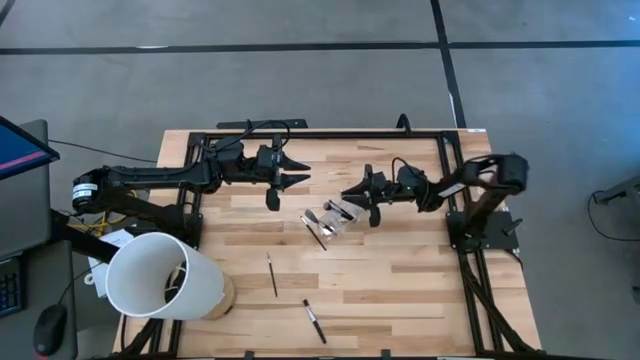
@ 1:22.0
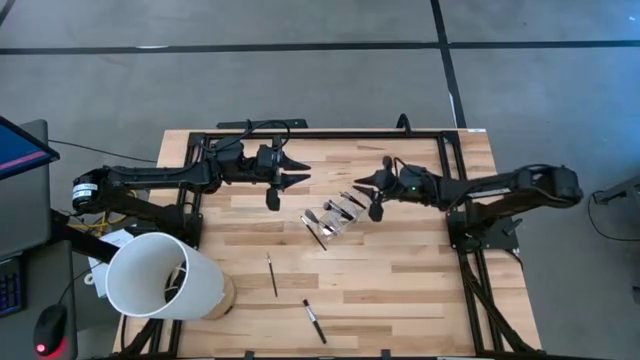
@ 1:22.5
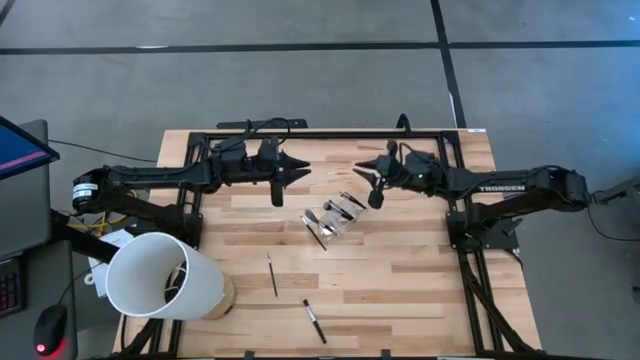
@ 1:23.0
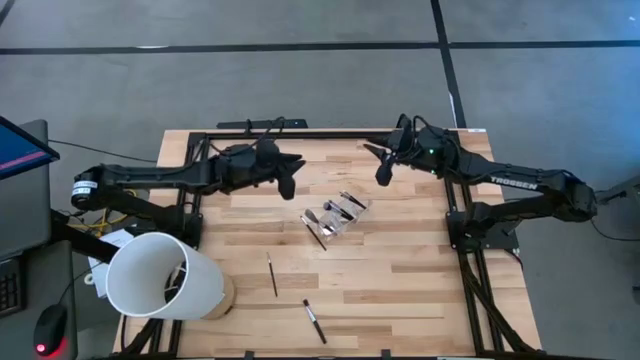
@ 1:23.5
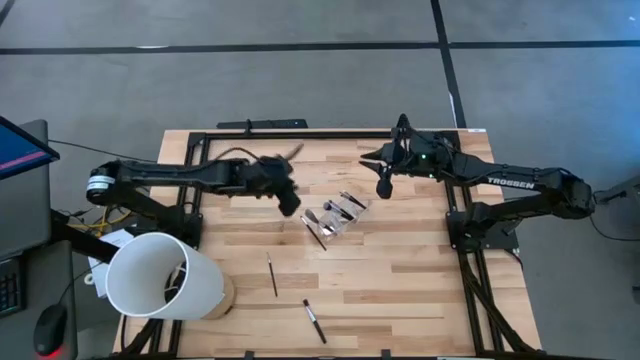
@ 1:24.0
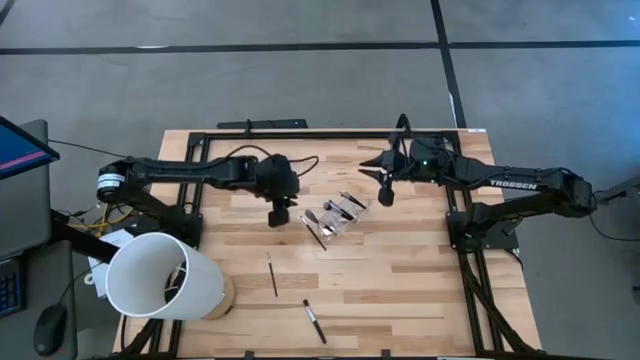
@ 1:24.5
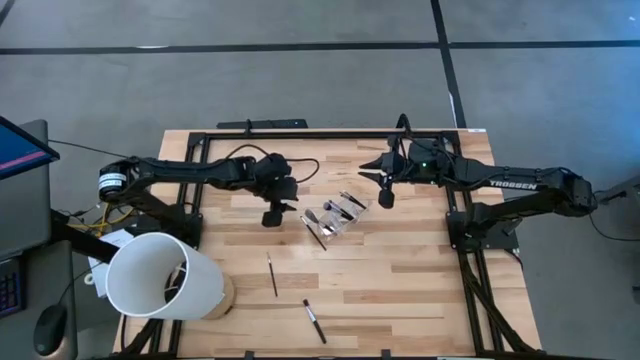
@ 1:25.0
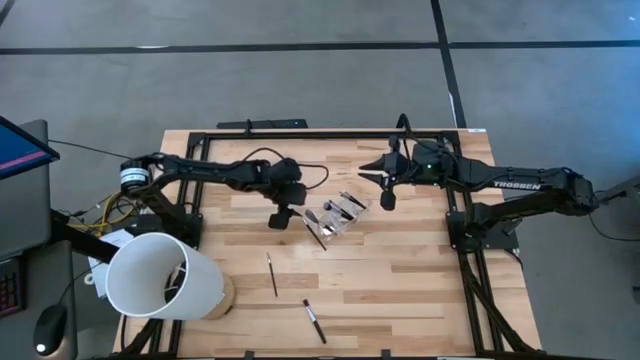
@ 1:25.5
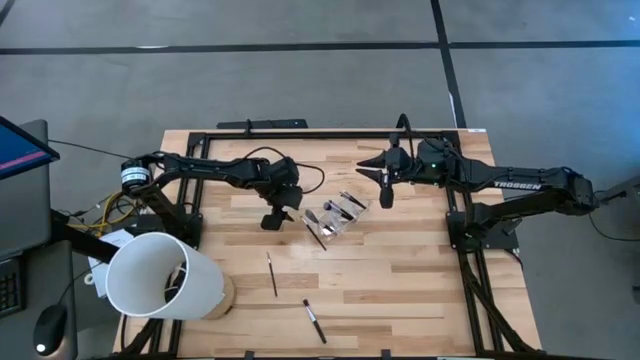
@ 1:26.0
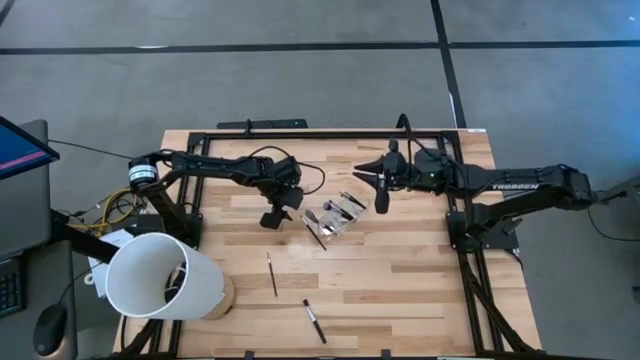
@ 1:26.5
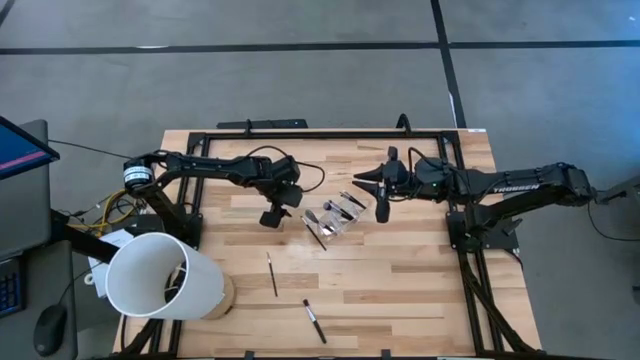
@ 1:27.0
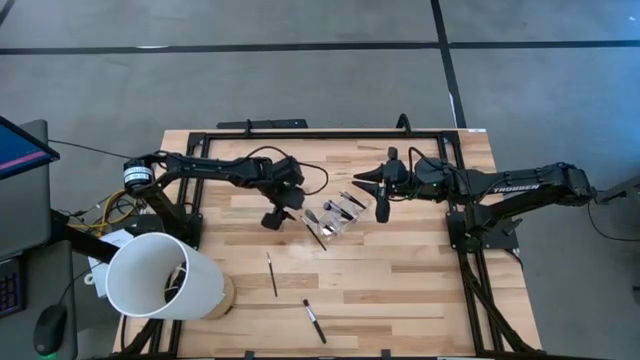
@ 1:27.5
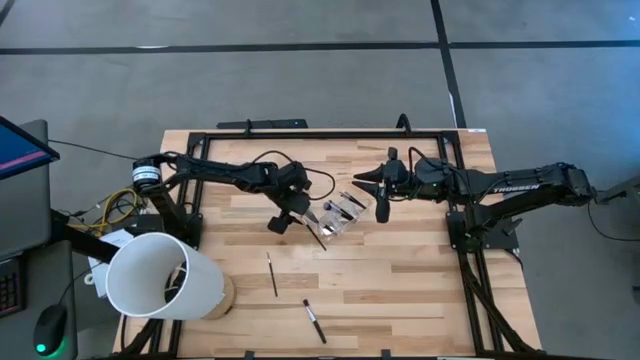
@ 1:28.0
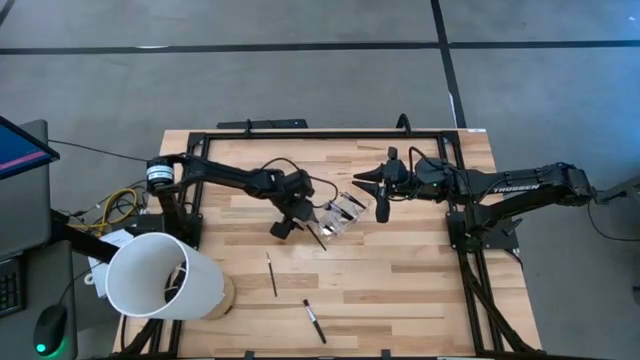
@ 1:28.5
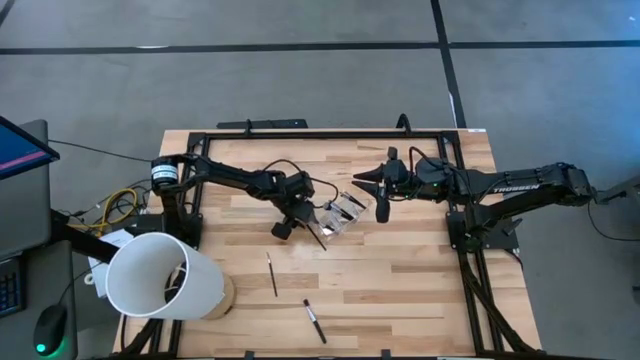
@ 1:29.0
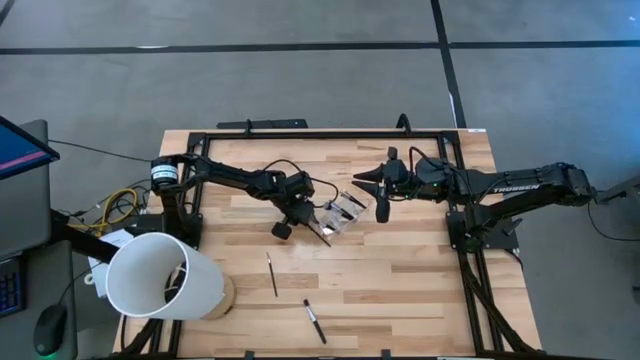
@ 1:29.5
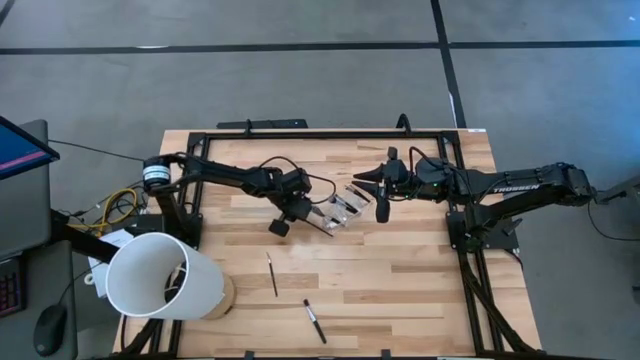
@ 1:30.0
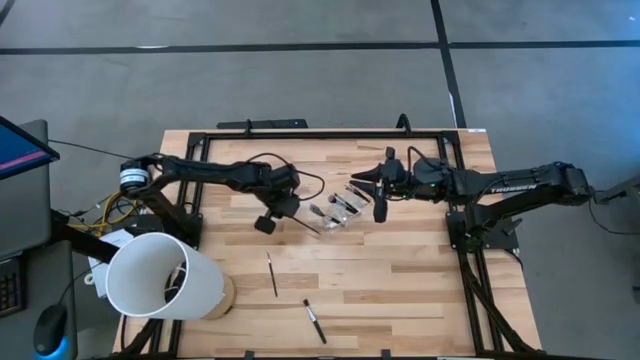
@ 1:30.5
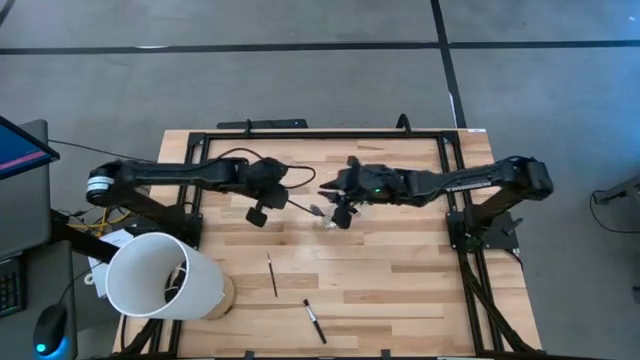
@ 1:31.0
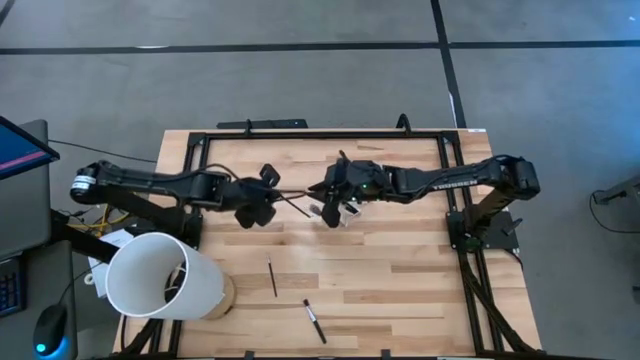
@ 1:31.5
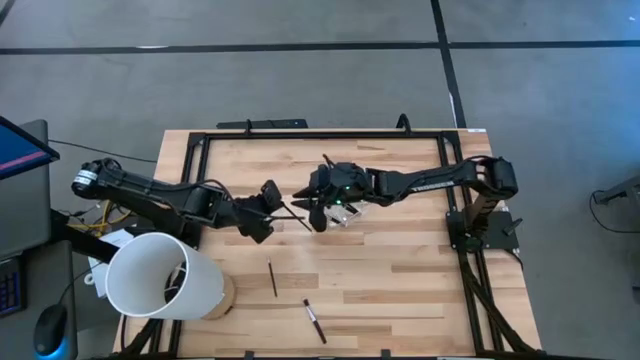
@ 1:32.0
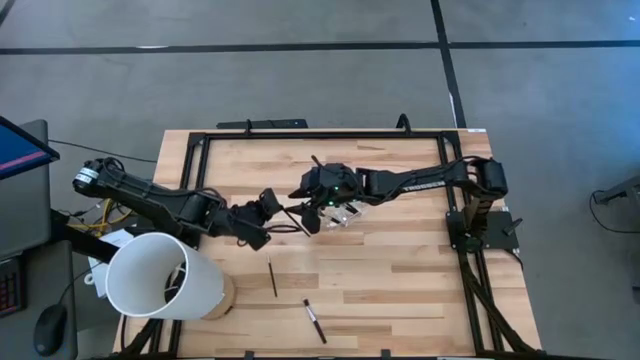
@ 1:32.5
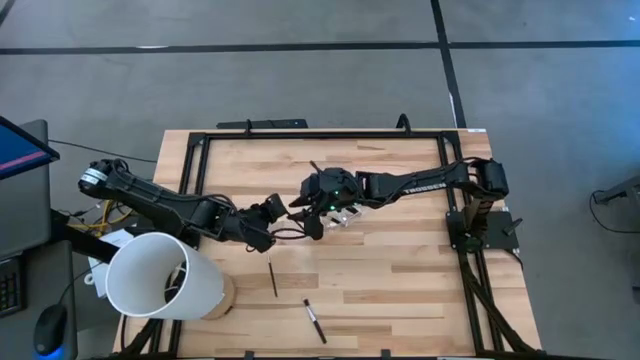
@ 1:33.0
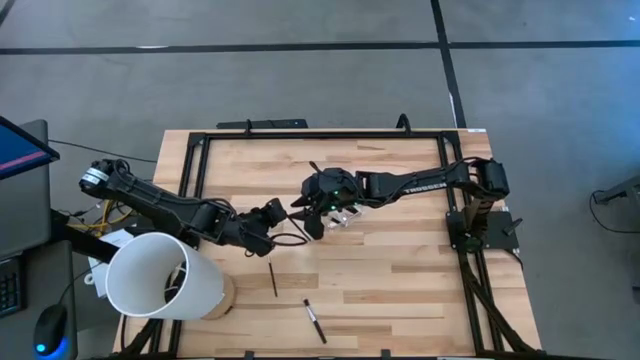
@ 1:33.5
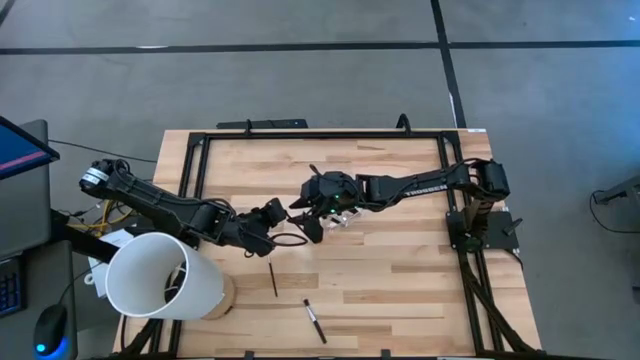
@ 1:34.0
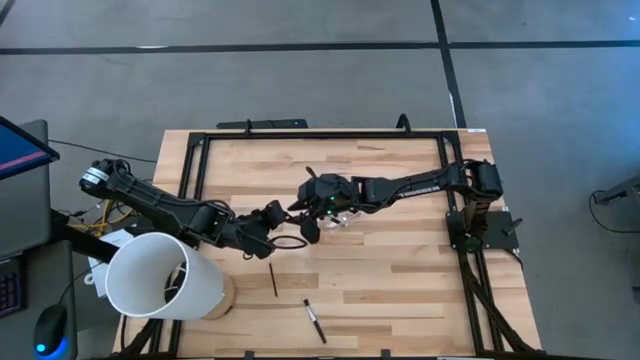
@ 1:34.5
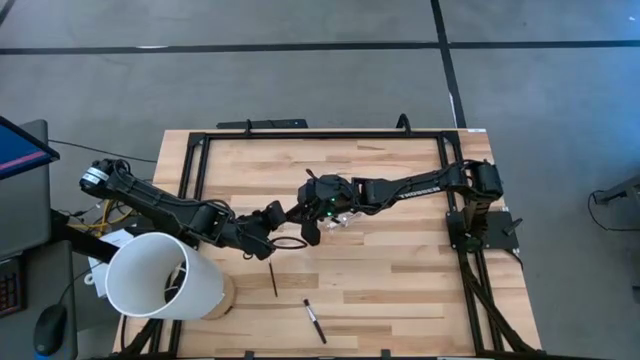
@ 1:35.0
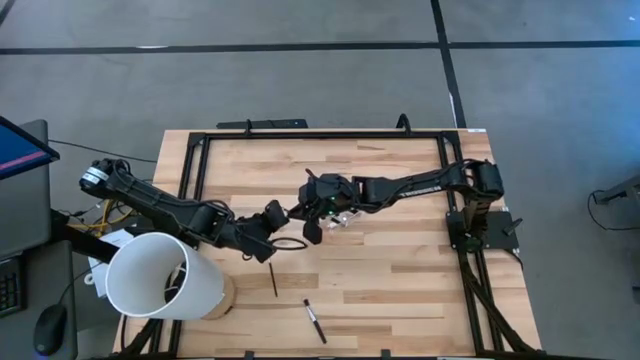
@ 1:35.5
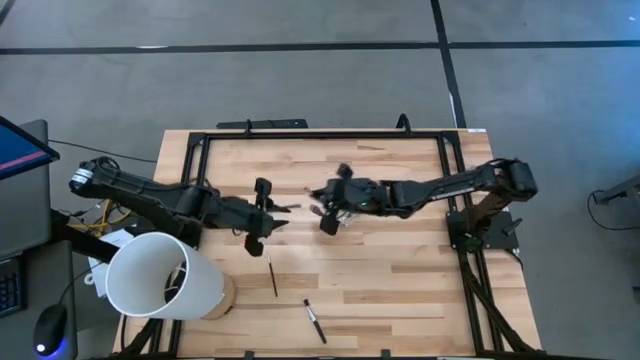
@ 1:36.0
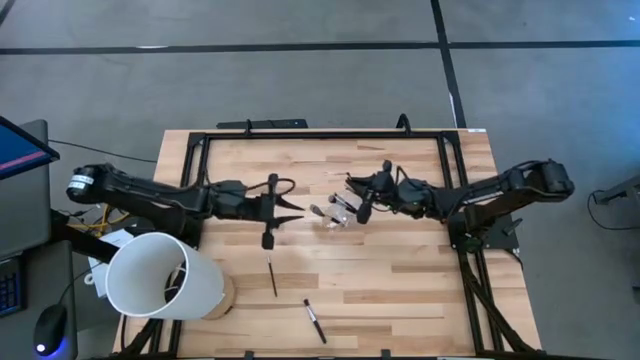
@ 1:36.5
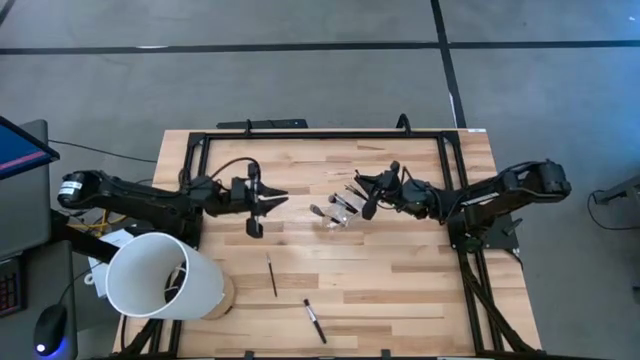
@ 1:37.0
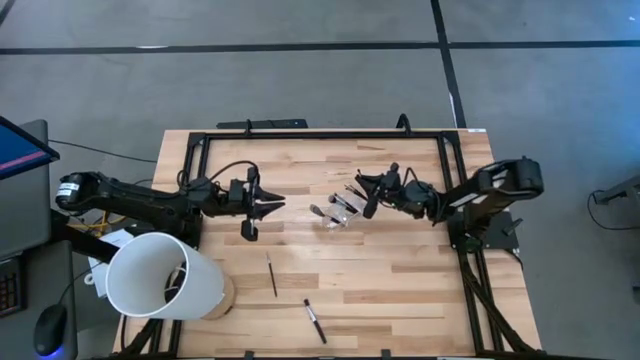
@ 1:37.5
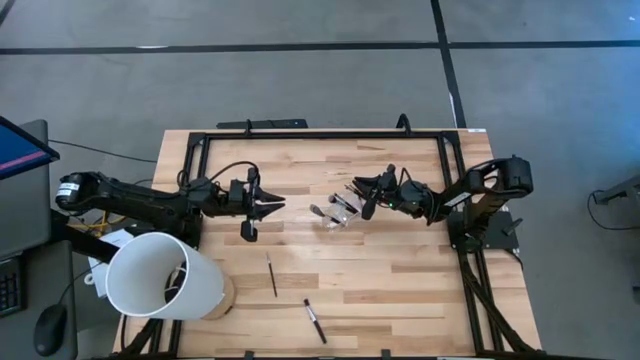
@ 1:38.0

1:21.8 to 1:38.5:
Task: Put items in baskets/containers
Put the black eyeshadow brush into the transparent organizer

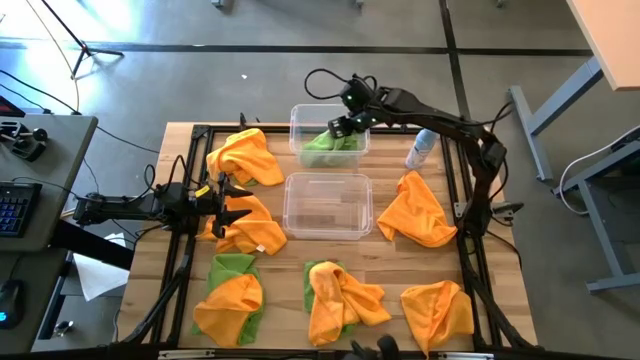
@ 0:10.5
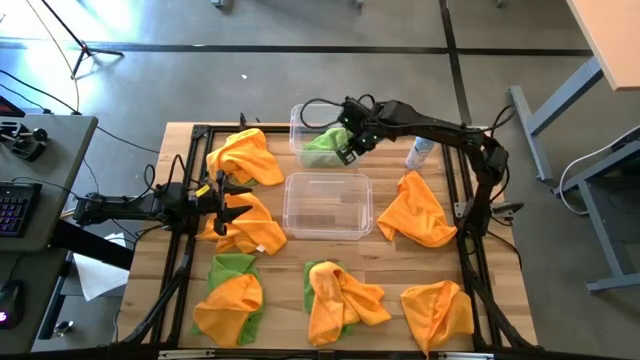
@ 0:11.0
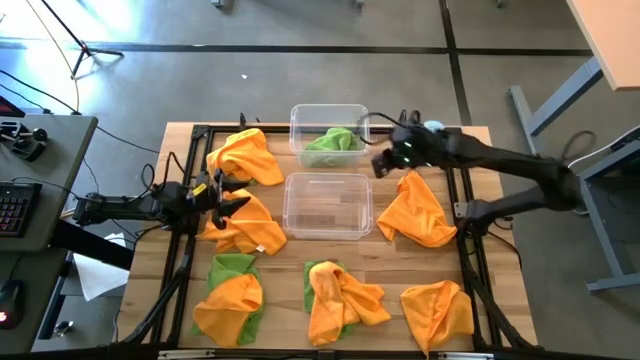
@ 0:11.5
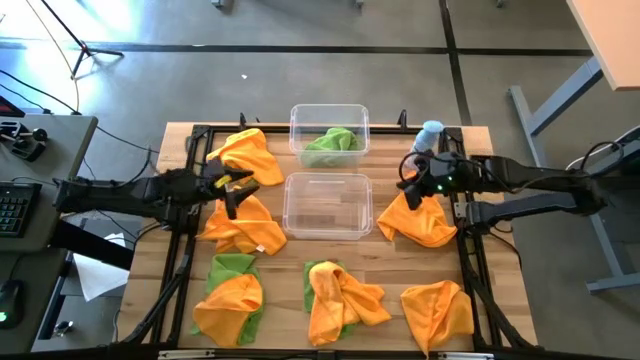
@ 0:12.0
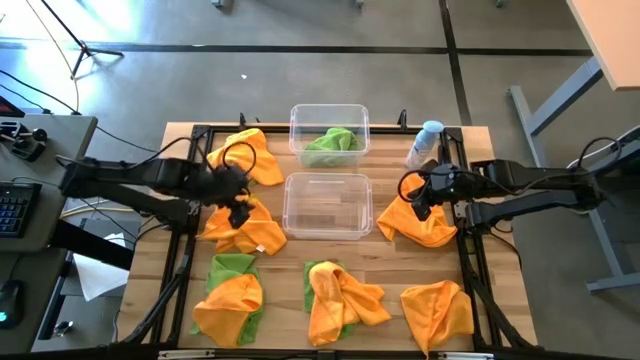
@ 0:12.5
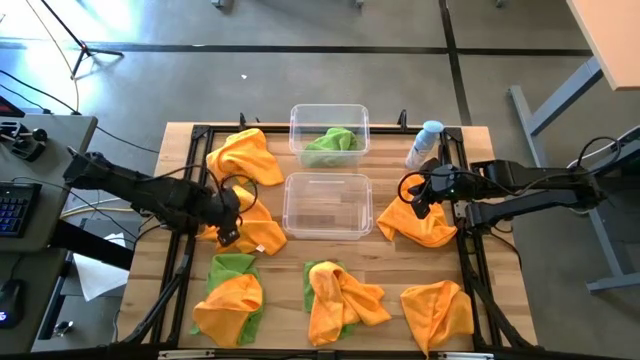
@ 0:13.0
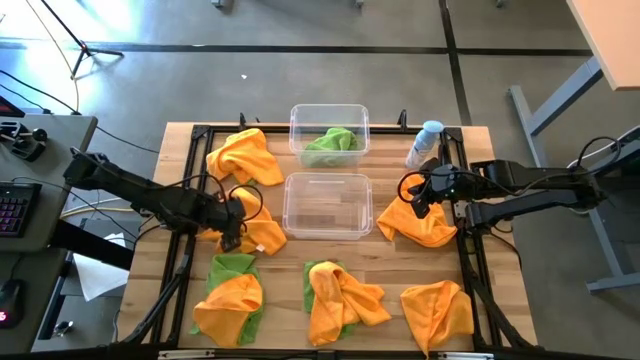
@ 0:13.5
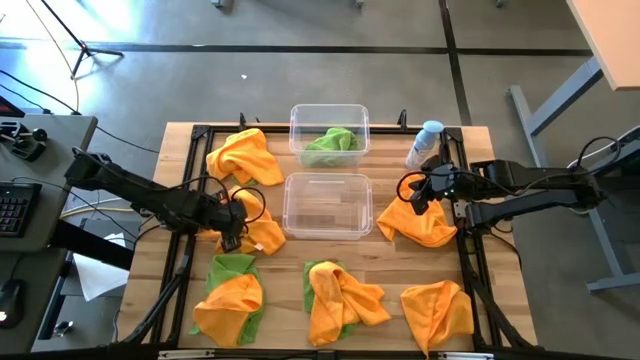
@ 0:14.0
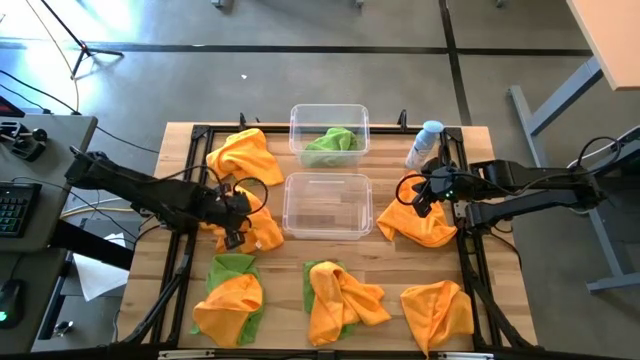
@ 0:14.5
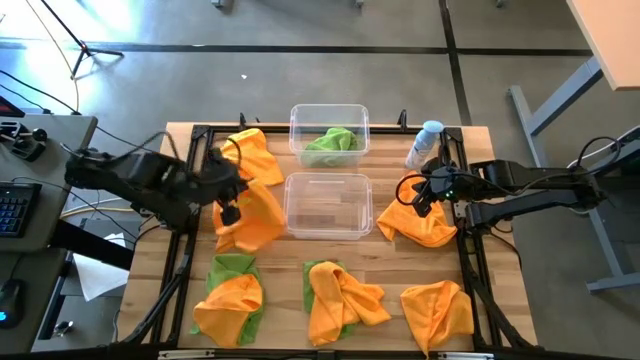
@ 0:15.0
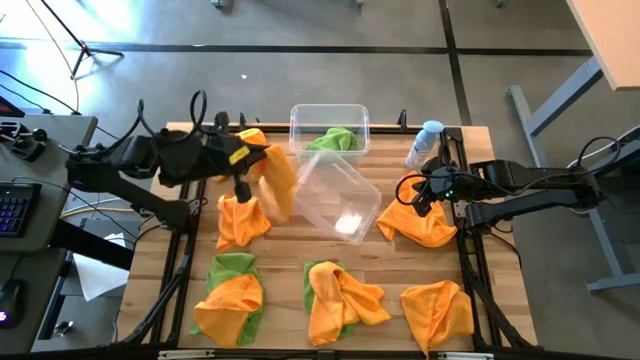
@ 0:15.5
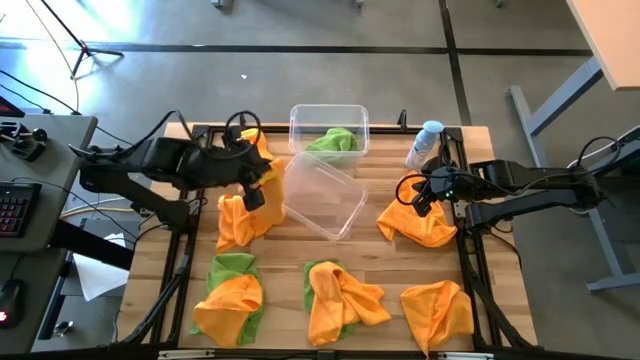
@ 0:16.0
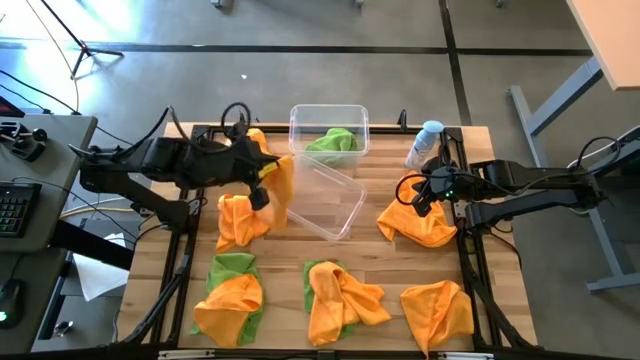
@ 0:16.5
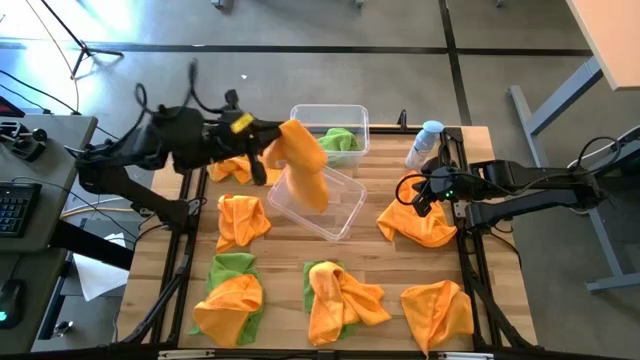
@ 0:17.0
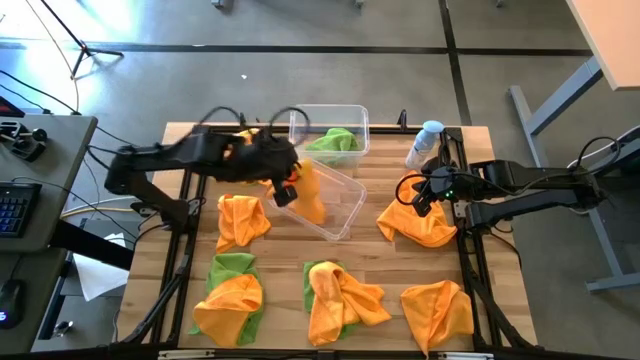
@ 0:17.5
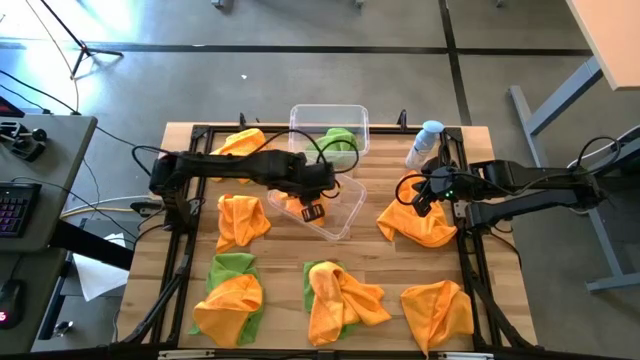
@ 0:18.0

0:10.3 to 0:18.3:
Task: Sort microfiber towel by color & place in baskets
Put the orange microfiber towel into the bottom transparent bin
